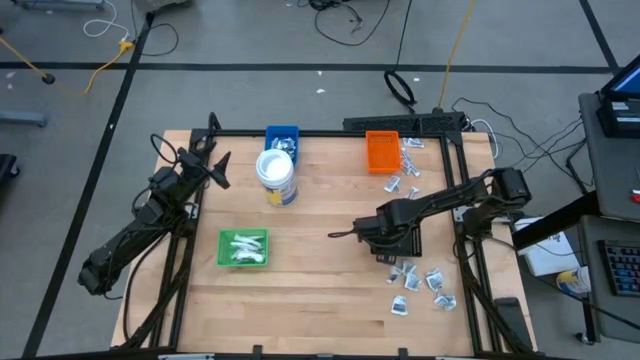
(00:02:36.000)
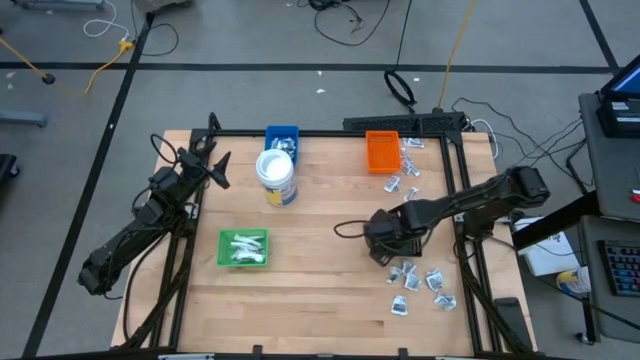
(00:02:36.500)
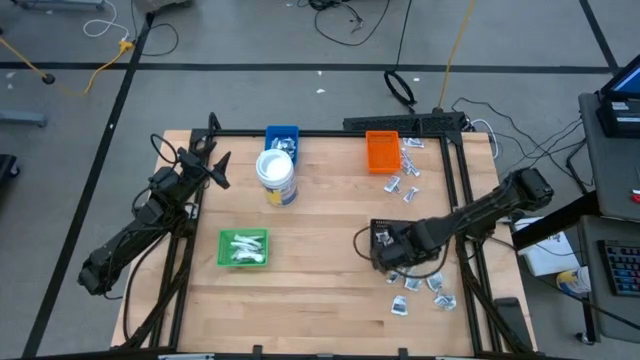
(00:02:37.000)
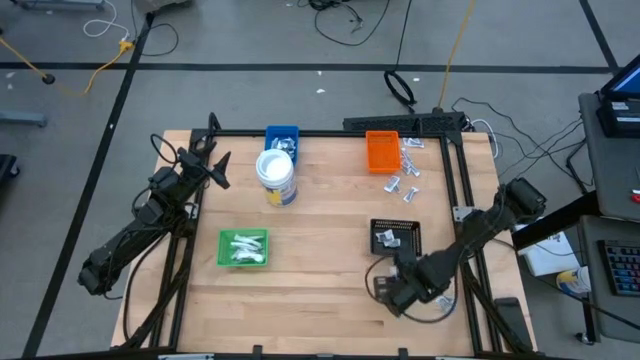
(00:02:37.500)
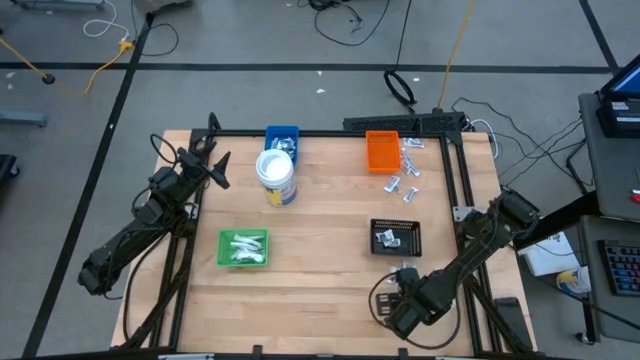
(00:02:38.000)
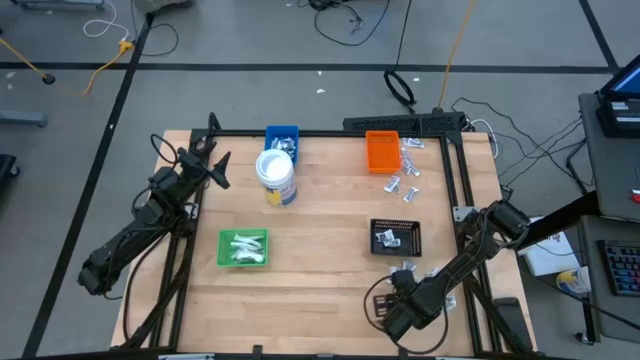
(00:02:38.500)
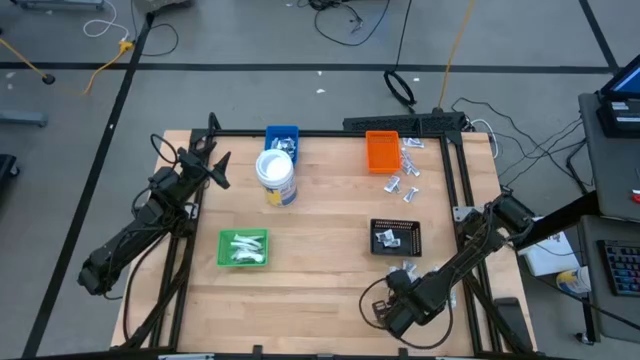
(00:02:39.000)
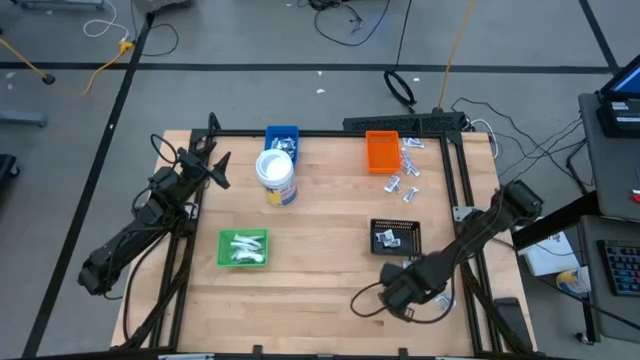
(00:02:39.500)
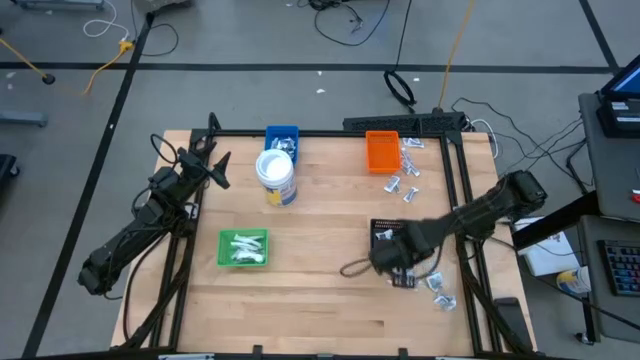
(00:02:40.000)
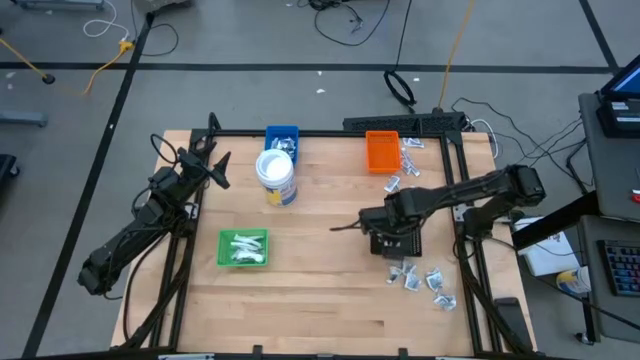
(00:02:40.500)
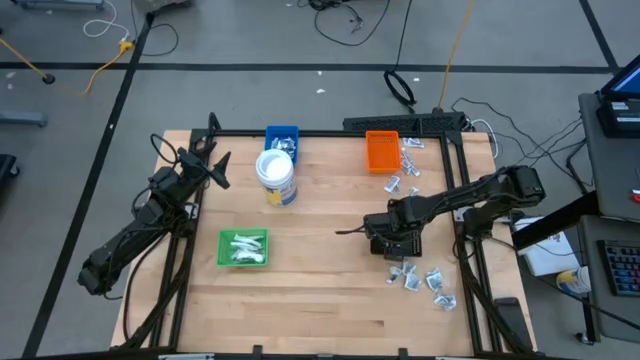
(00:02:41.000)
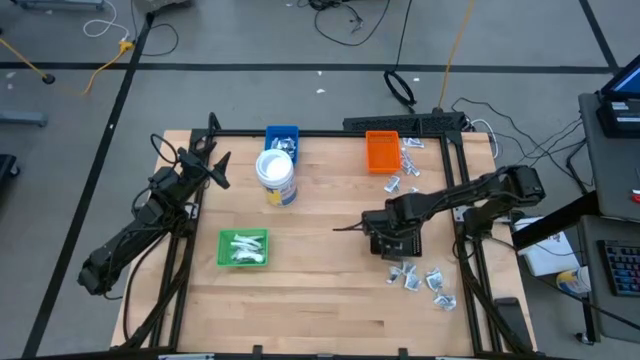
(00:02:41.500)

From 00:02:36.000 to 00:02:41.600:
Task: Pick & Place First Aid Supplies
Put the gray towelette pack into the black bin

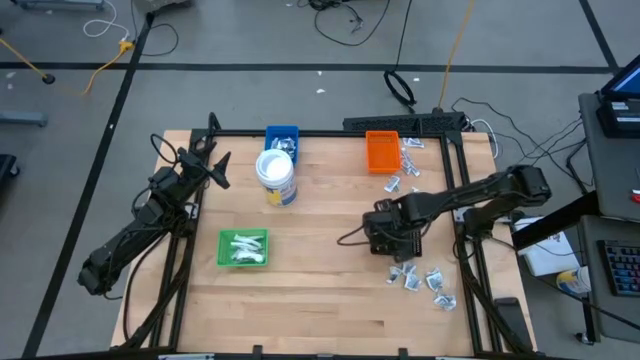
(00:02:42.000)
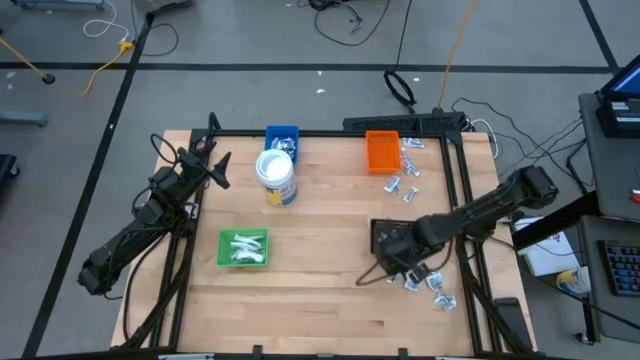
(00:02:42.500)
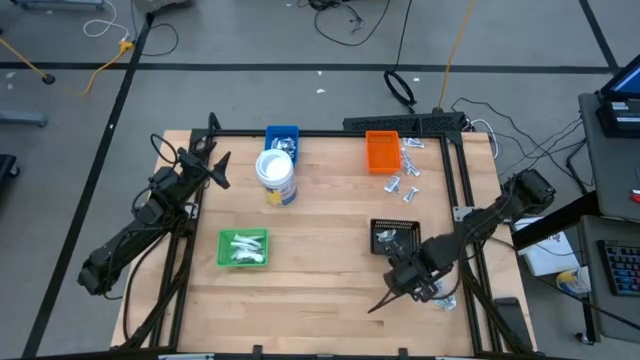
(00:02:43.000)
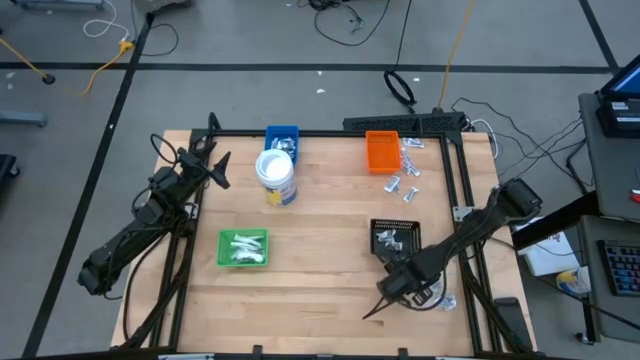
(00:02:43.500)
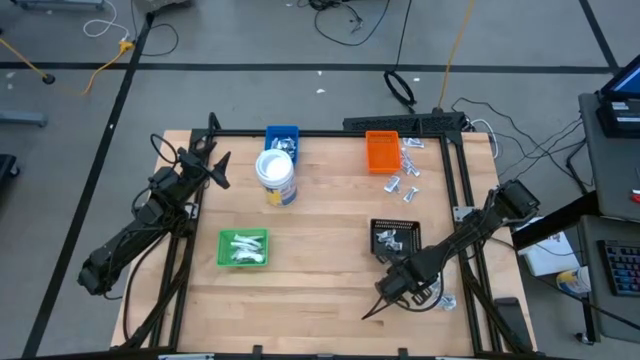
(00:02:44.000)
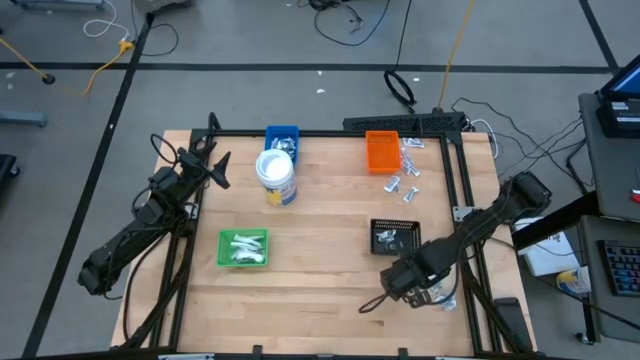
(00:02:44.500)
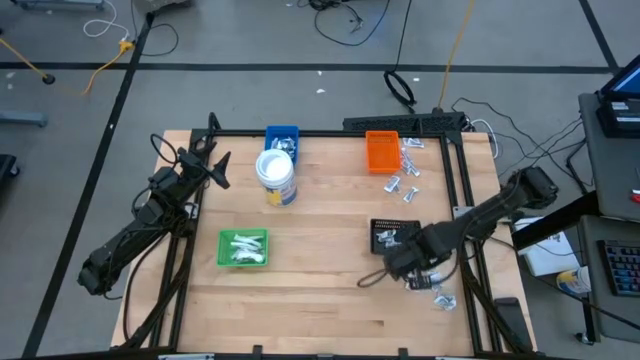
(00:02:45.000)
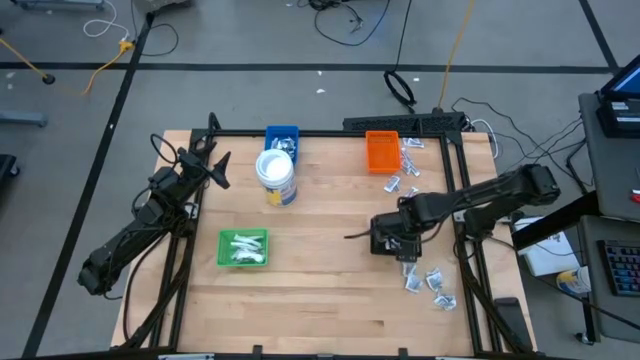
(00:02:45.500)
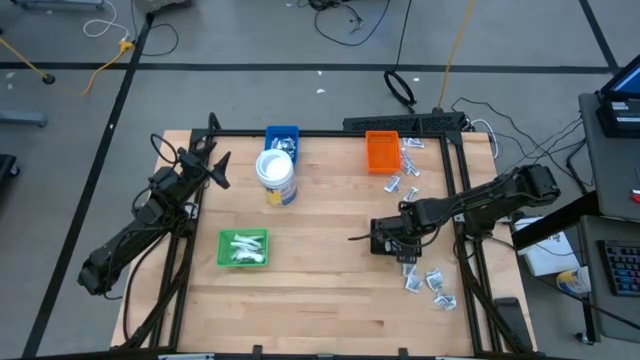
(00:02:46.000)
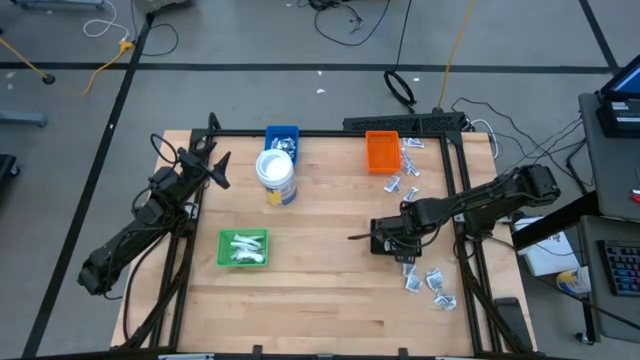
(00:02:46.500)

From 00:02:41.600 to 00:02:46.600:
Put the gray towelette pack into the black bin

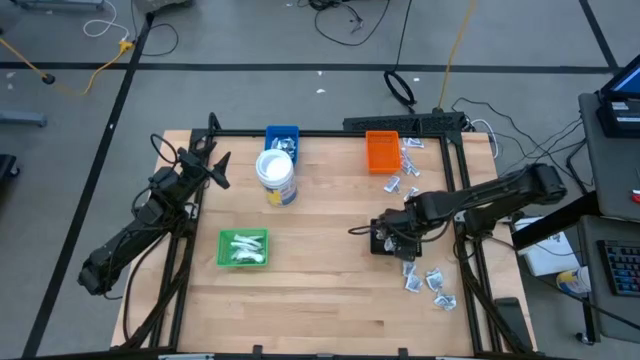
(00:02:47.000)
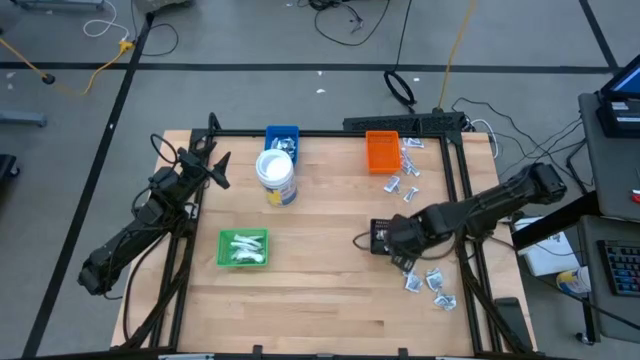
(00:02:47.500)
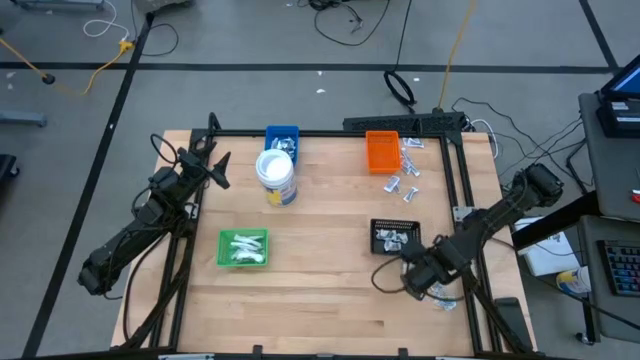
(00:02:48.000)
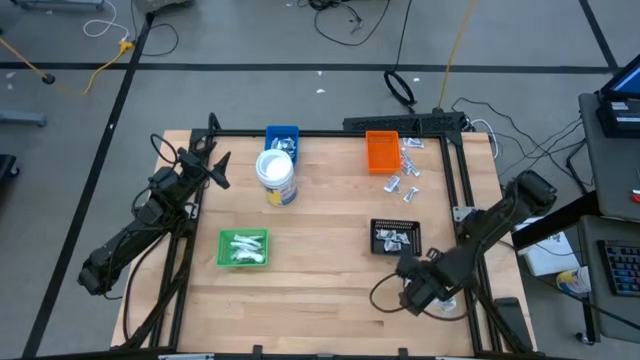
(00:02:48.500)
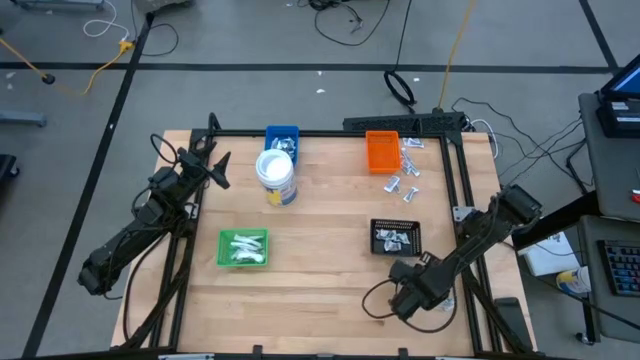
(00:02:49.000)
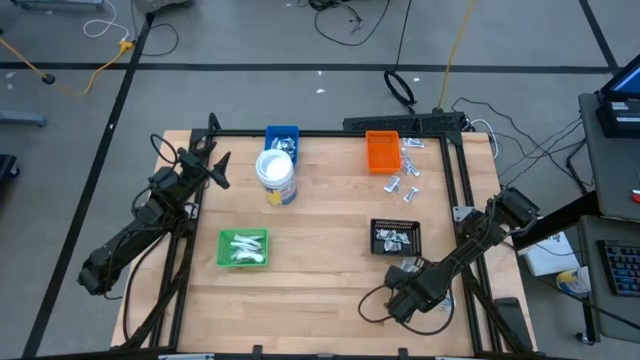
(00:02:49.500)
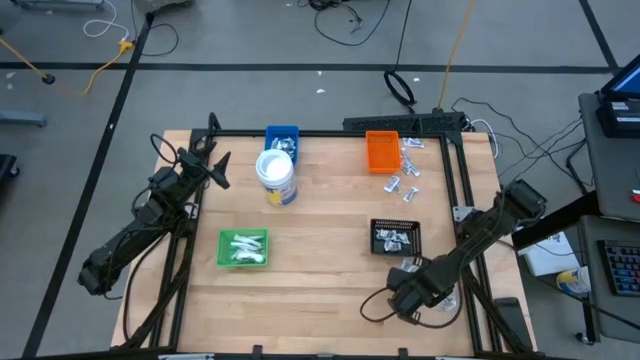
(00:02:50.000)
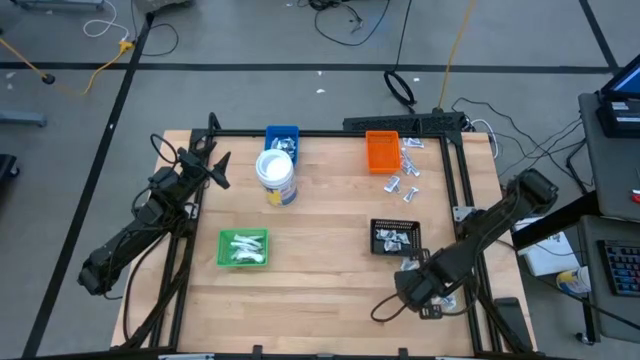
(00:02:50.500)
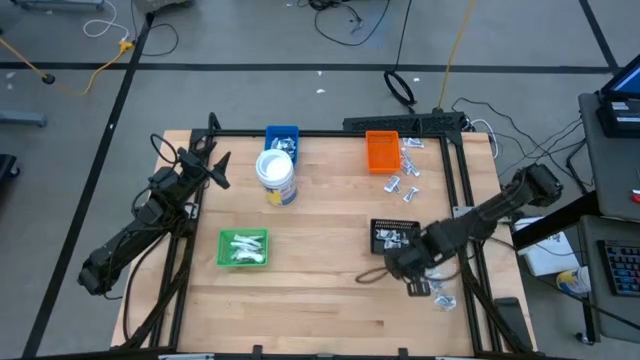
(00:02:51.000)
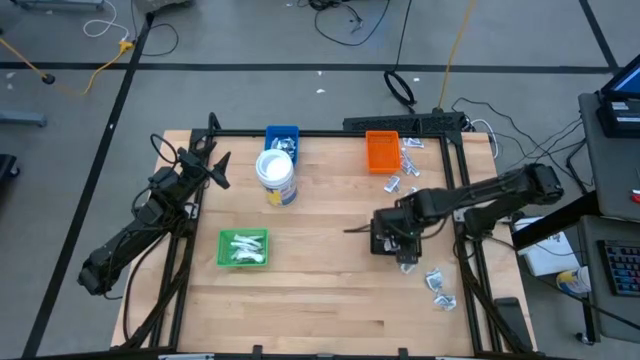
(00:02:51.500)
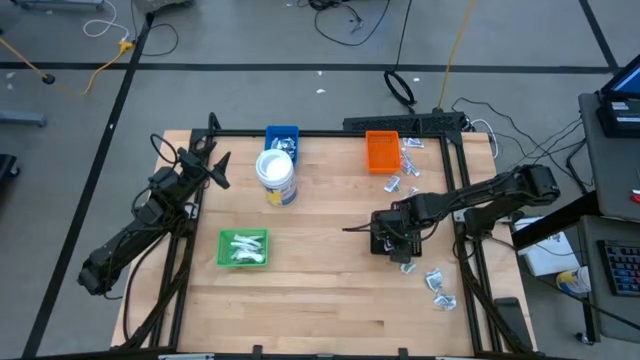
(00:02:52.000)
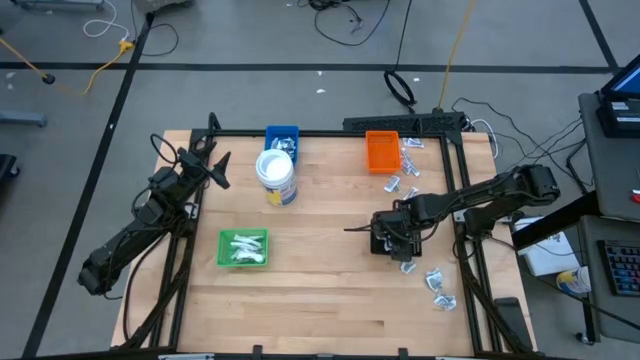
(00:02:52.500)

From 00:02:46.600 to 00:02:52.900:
Put the gray towelette pack into the black bin

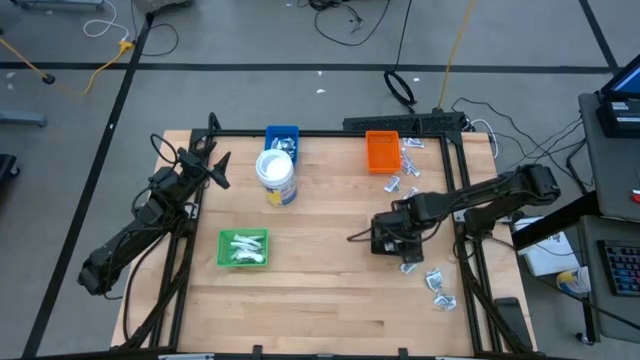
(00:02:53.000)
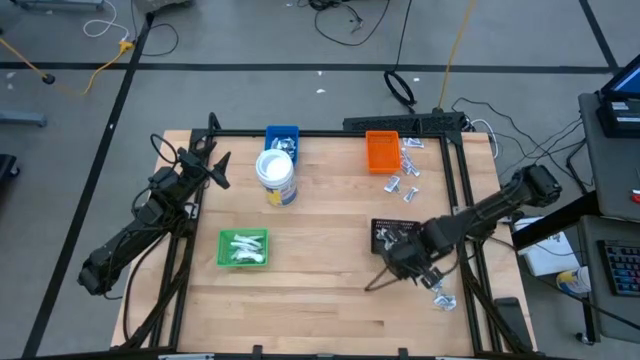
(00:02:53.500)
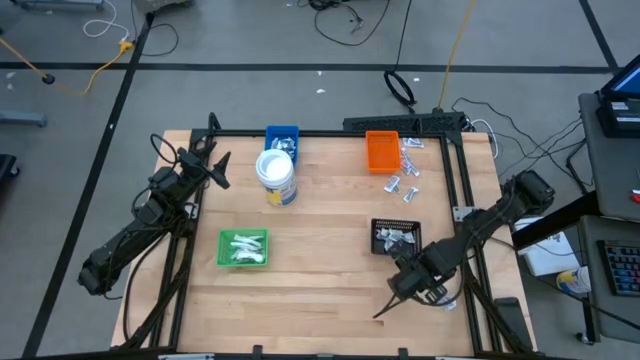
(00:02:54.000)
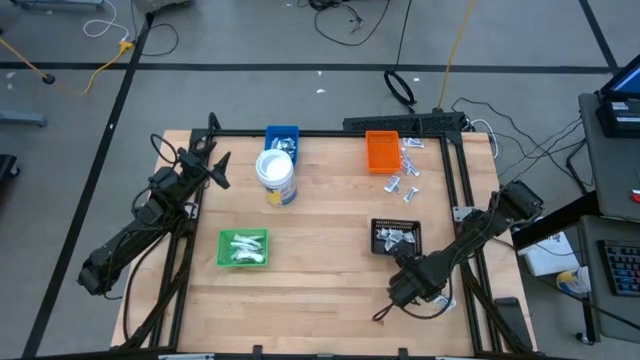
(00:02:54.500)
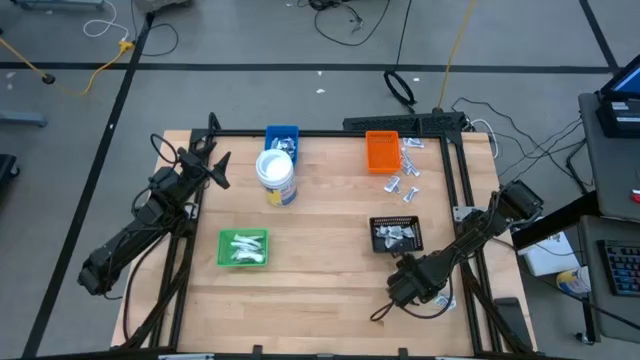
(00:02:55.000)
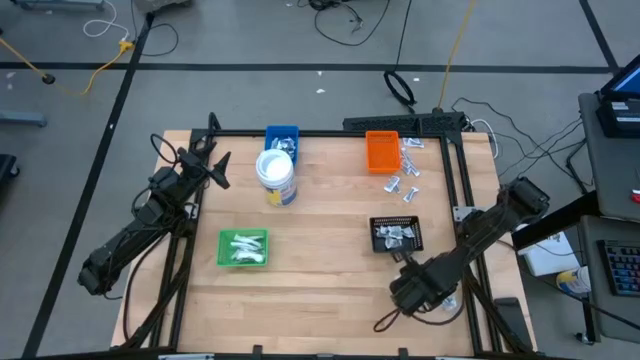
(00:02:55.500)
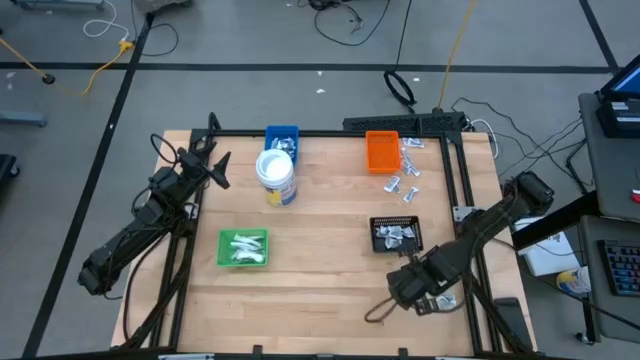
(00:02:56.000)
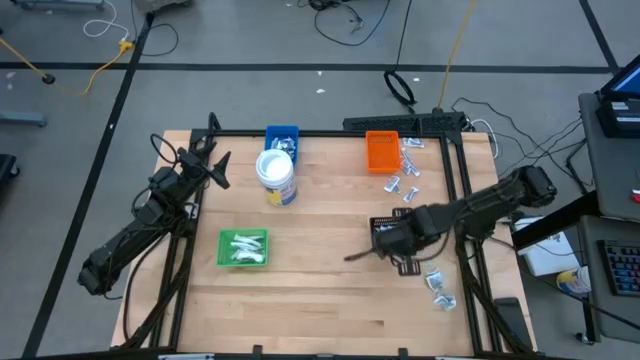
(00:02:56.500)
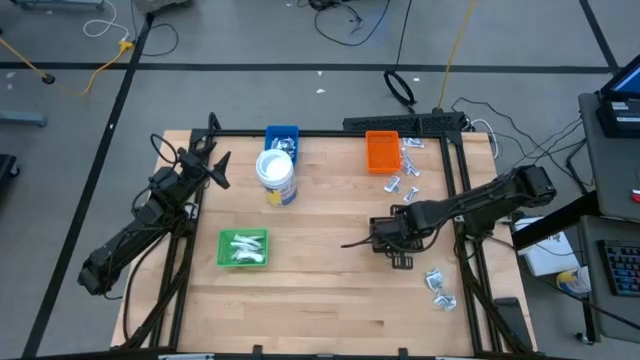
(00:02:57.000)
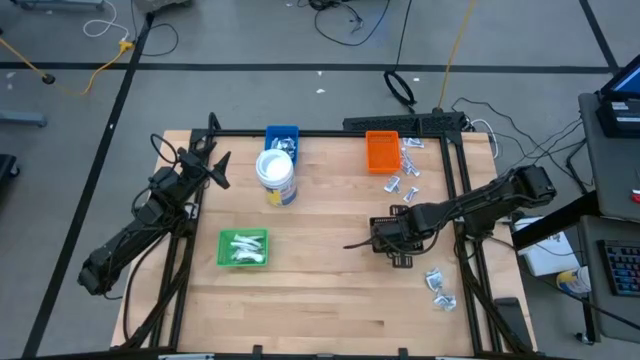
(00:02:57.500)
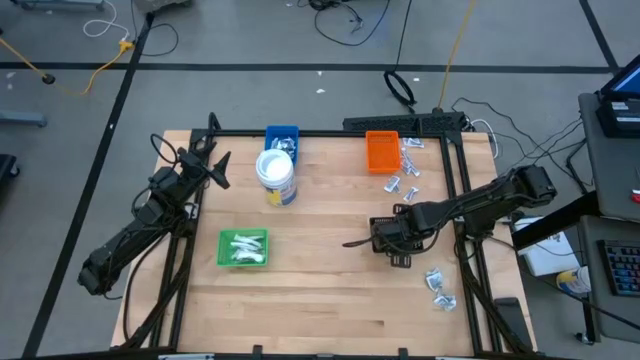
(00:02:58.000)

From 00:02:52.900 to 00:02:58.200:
Put the gray towelette pack into the black bin
